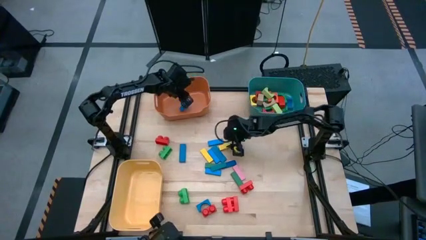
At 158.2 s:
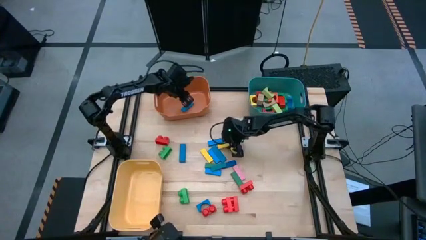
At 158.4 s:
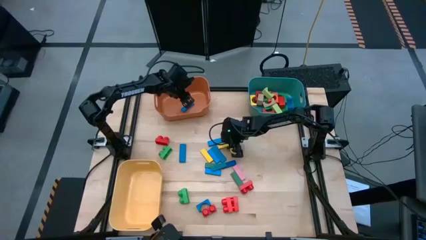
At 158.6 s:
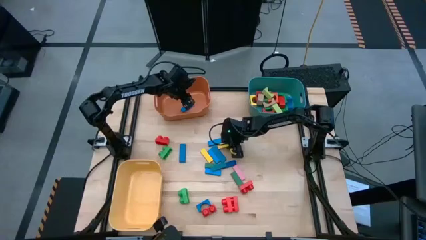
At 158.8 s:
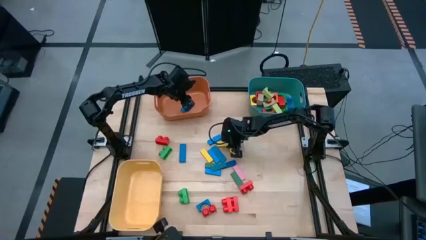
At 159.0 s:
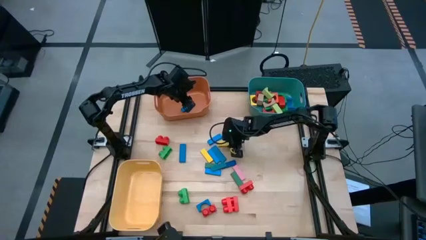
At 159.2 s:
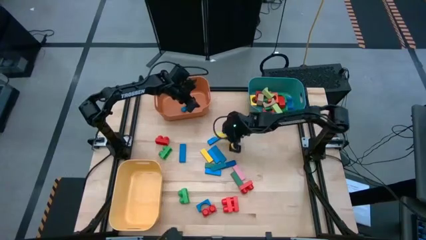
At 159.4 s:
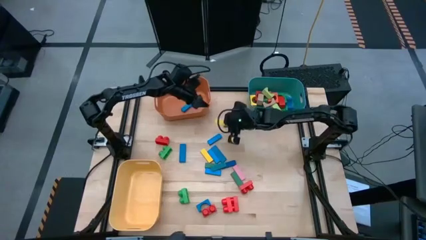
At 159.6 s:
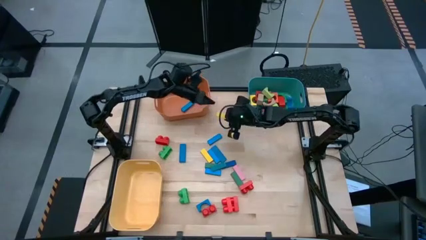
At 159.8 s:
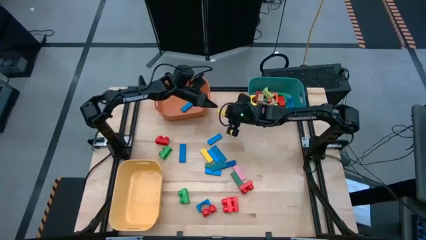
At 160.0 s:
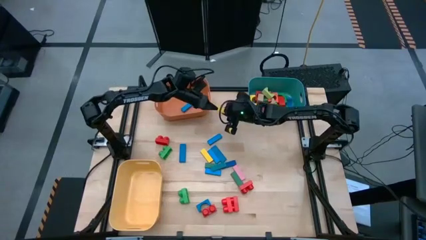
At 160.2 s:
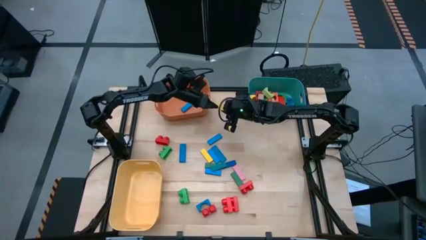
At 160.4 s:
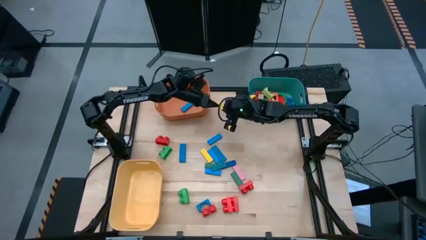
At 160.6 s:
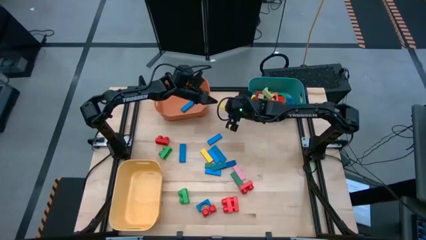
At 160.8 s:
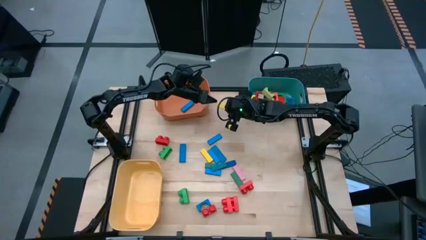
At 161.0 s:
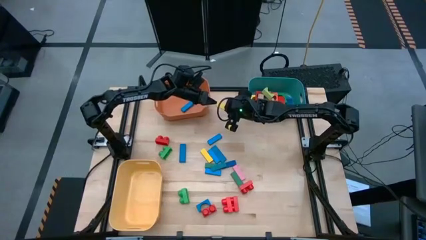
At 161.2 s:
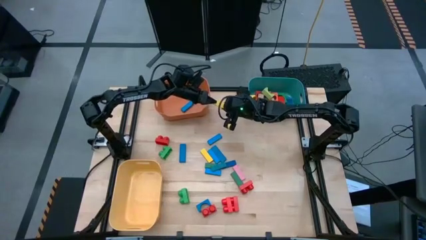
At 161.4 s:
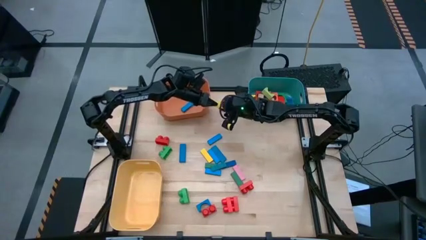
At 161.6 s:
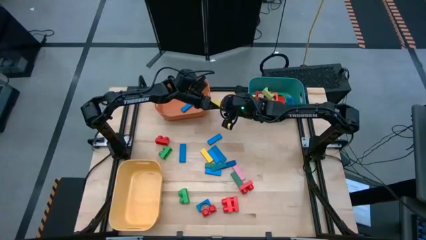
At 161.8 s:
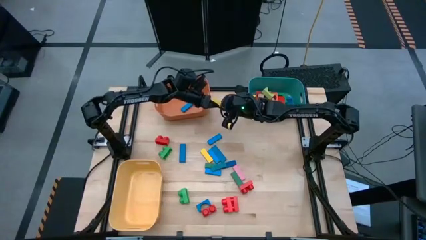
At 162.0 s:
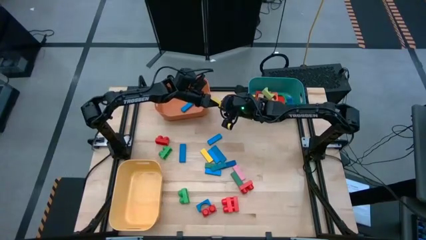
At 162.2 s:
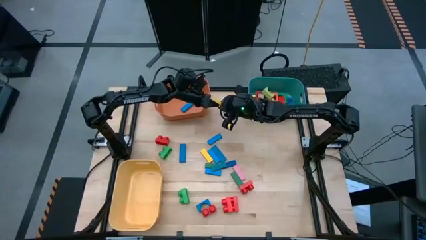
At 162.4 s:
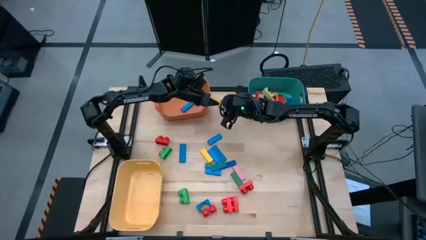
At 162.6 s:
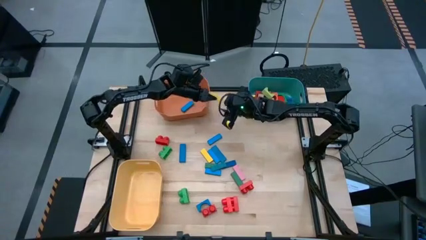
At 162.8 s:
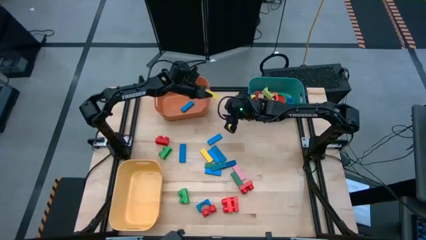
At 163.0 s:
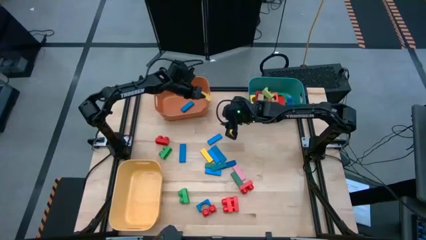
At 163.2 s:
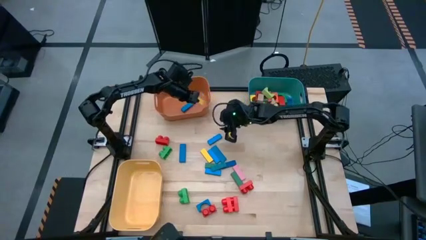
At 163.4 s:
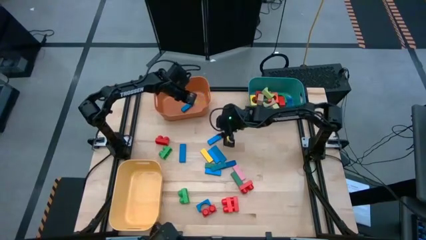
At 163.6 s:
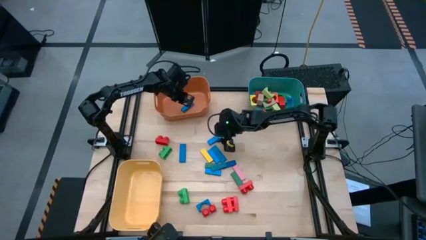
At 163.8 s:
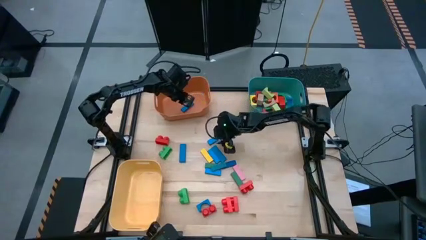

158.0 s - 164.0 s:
Task: Sort blocks by size
Put the yellow rectangular block into the orange bin

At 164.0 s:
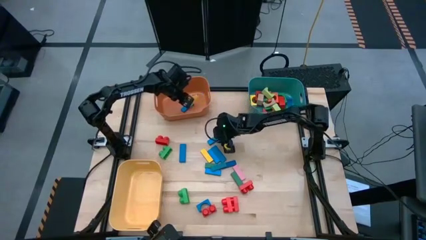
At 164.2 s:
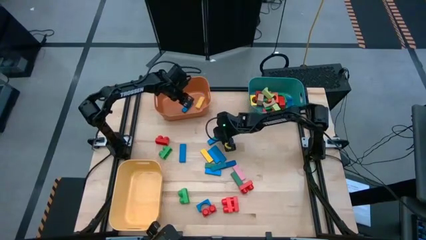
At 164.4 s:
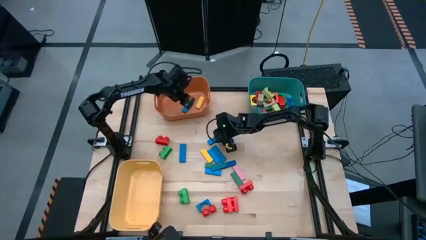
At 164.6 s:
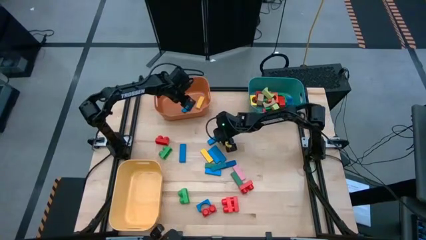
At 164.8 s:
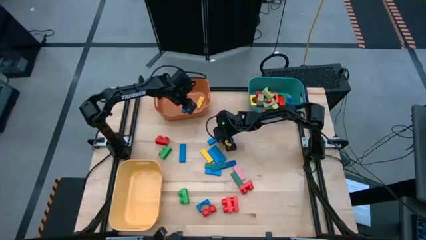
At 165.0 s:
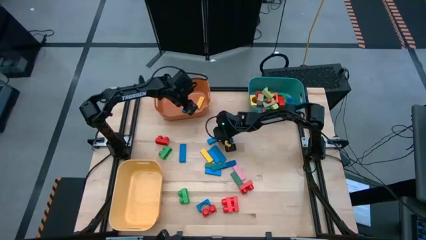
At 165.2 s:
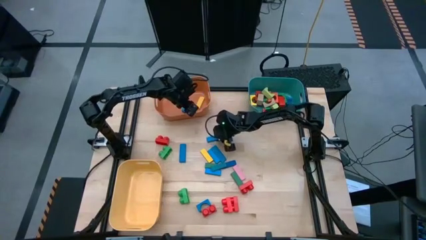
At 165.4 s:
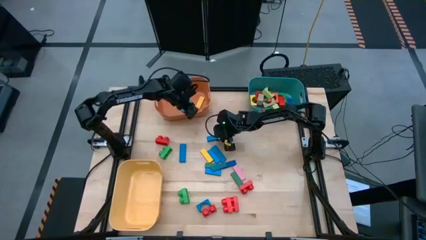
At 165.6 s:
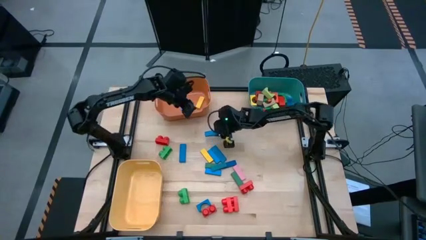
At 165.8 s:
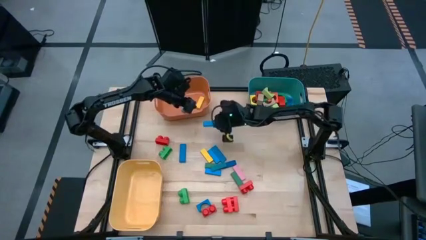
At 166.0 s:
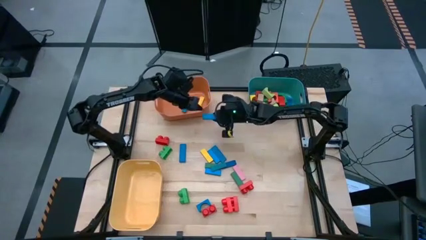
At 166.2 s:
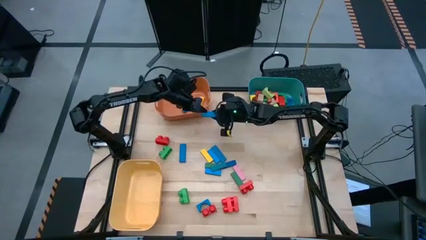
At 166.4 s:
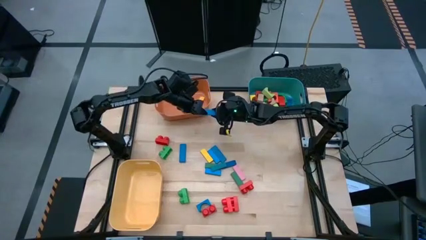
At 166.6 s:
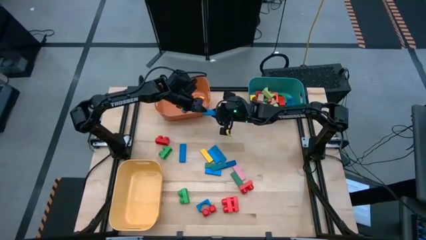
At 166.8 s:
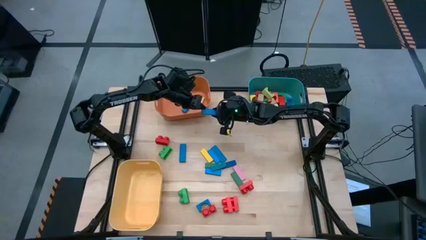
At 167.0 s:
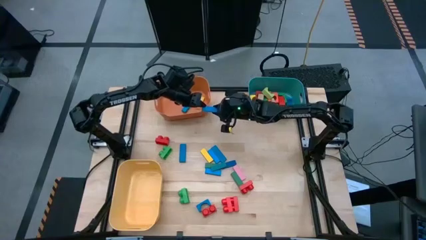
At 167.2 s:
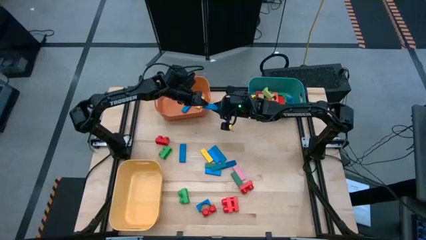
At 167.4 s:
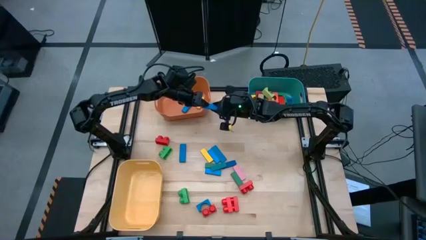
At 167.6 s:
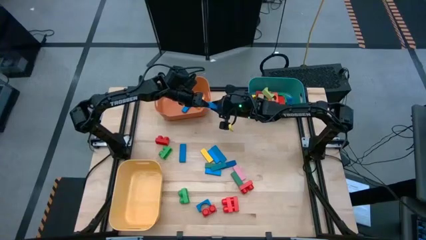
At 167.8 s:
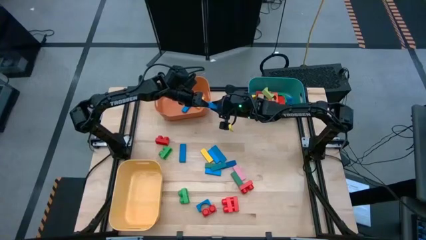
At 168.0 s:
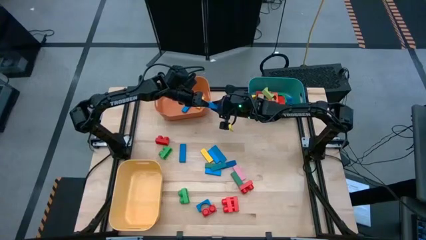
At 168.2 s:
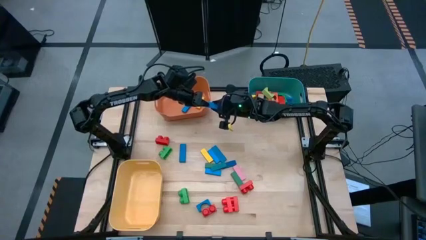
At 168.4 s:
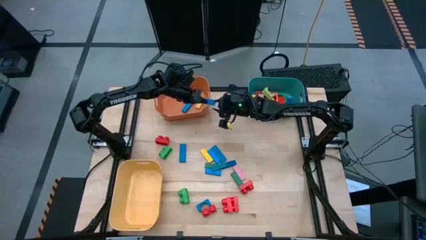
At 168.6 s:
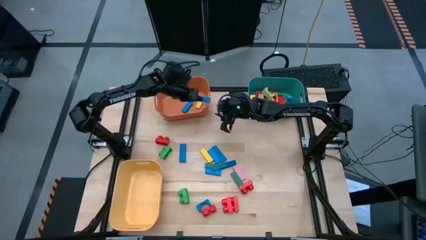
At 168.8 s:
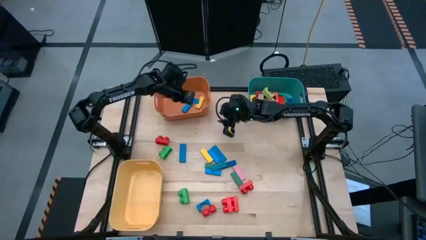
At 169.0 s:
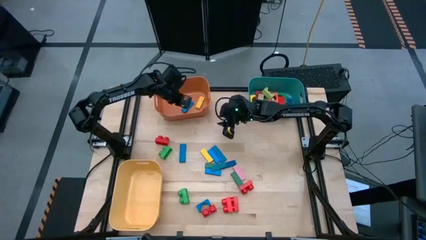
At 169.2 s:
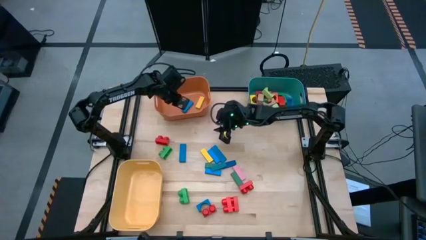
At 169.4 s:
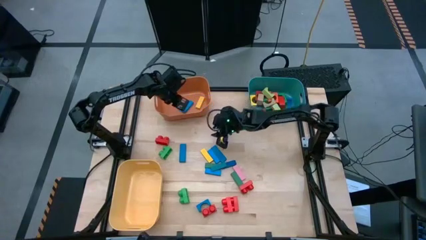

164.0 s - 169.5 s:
Put the blue rectangular block into the orange bin

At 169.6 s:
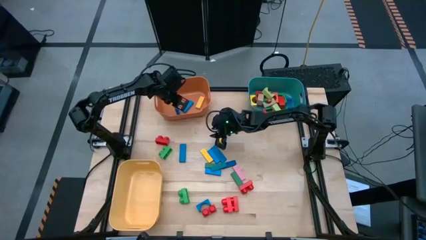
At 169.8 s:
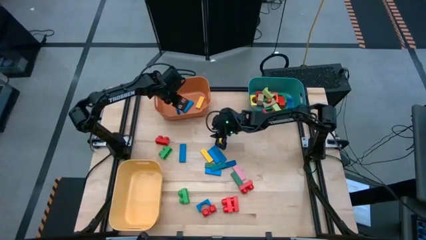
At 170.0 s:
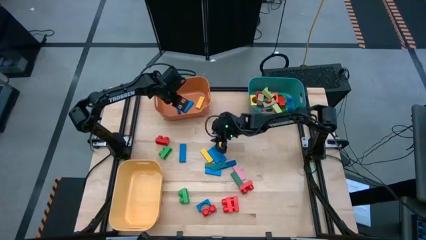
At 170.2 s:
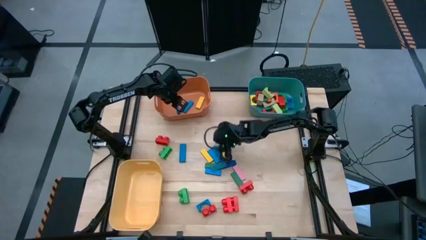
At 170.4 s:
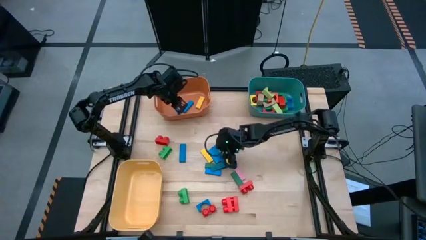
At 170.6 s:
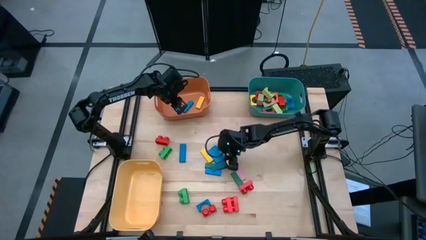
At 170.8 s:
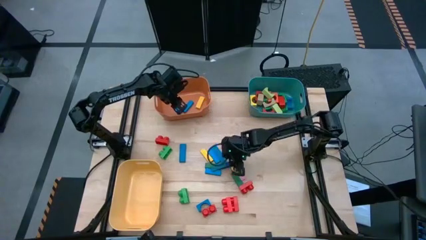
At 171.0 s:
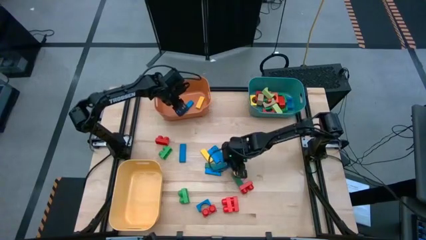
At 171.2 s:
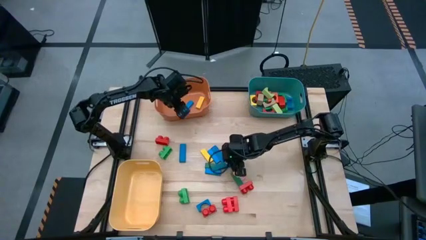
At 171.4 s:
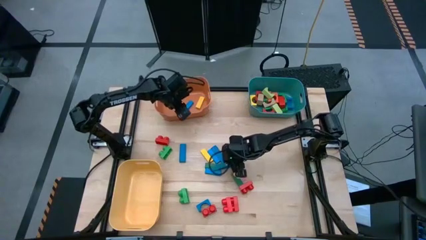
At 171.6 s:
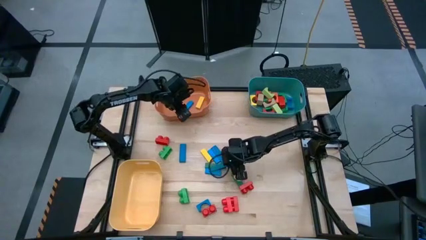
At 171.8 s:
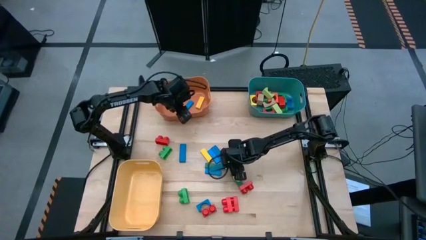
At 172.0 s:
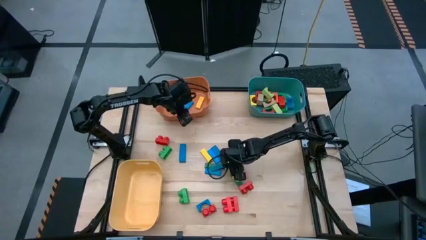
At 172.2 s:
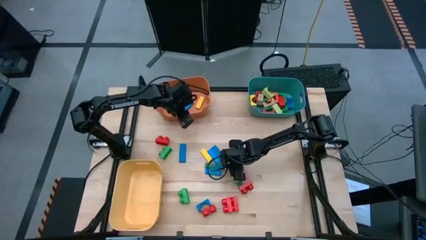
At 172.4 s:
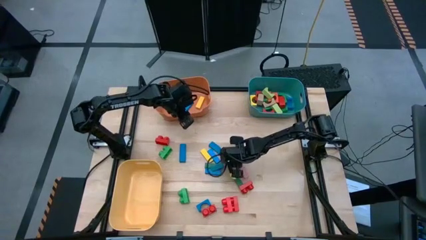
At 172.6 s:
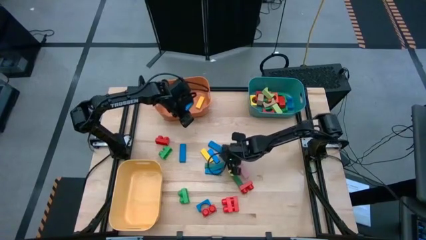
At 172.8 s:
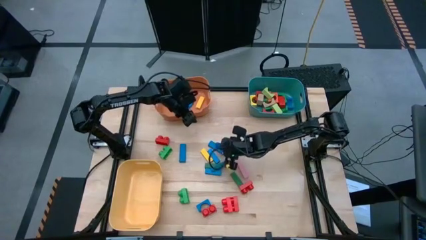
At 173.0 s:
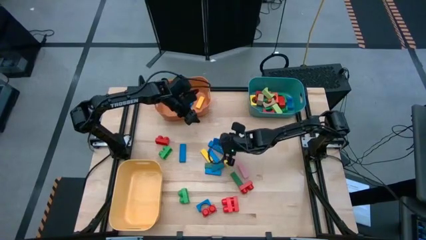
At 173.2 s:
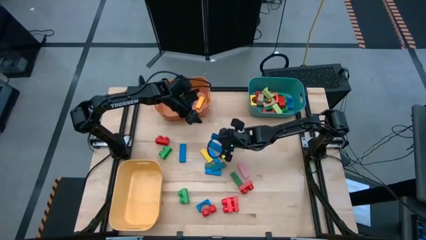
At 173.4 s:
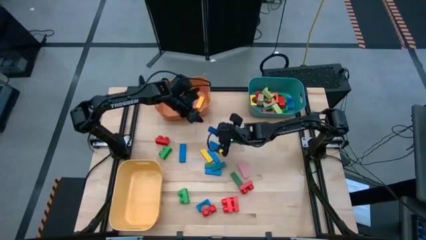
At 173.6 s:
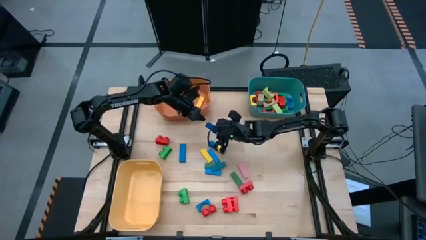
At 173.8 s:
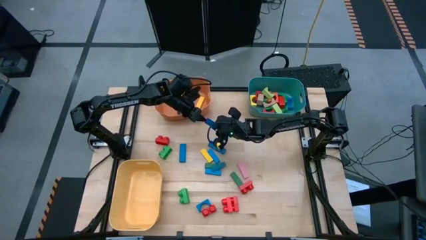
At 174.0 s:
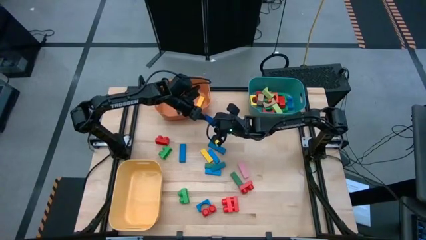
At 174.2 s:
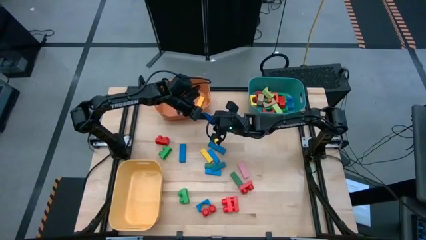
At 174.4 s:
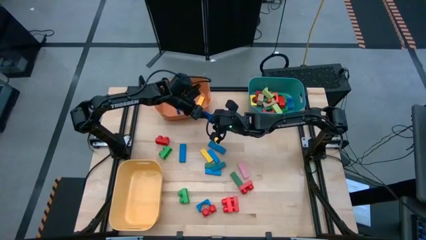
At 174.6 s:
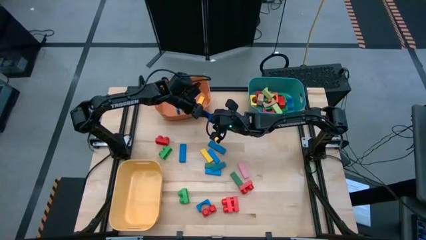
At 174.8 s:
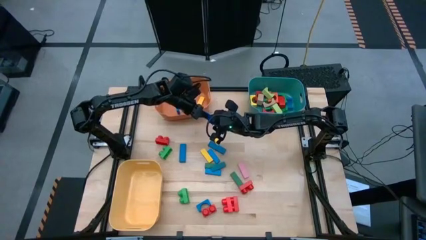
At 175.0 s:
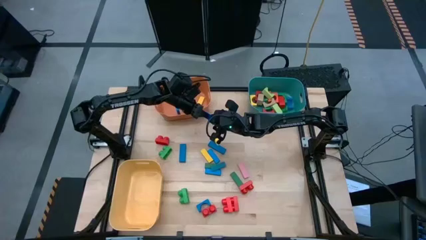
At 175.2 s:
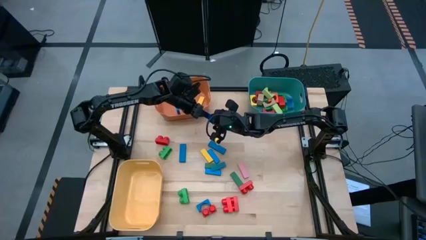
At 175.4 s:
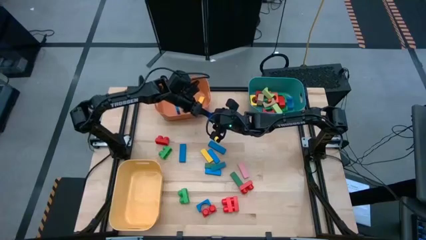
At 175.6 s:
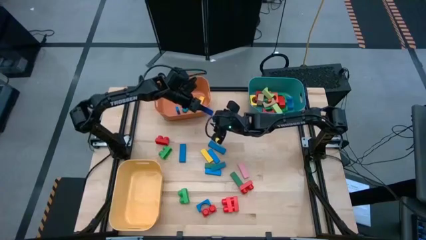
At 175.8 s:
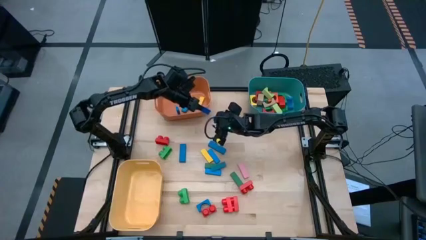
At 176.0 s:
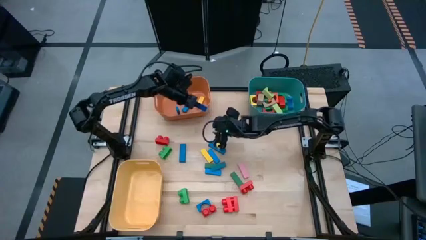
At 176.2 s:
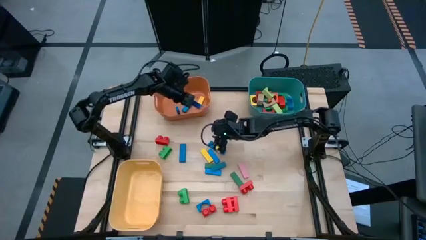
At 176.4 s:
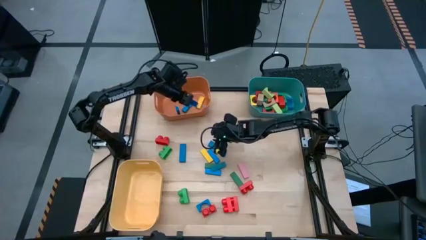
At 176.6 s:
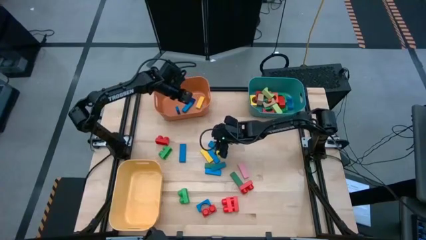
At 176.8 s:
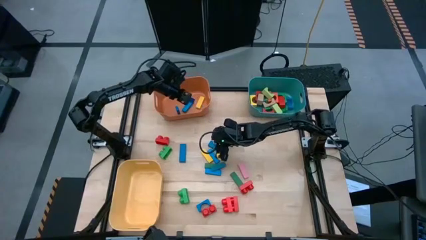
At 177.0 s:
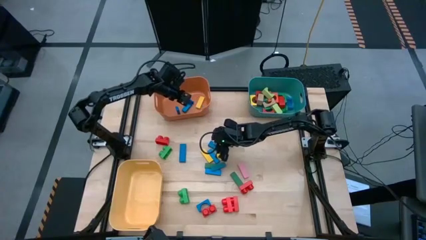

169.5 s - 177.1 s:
Put the dark blue rectangular block into the orange bin
